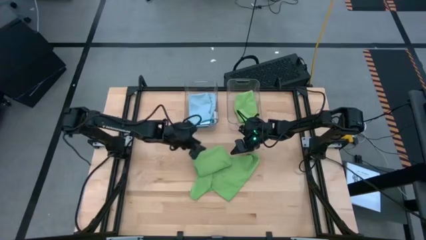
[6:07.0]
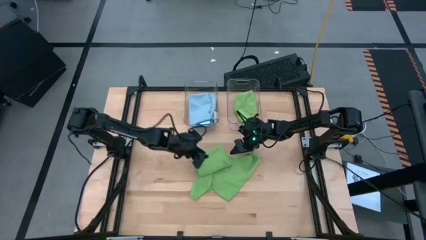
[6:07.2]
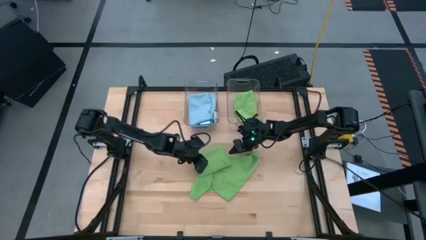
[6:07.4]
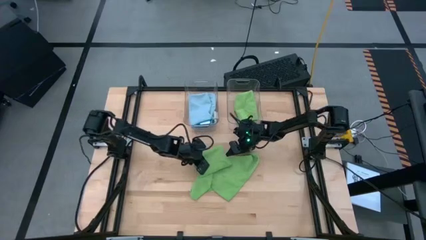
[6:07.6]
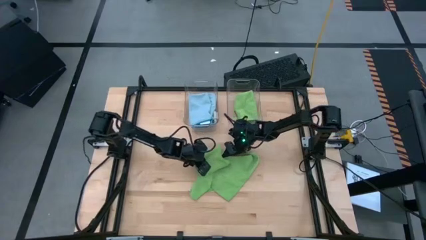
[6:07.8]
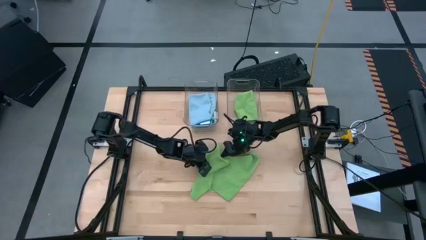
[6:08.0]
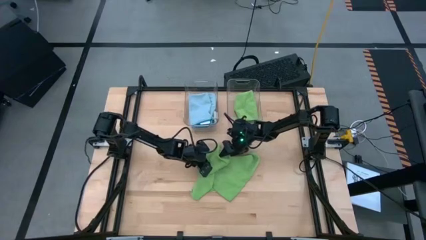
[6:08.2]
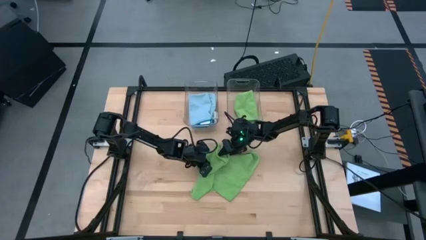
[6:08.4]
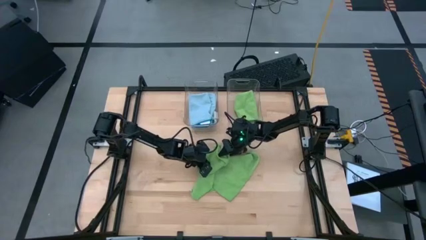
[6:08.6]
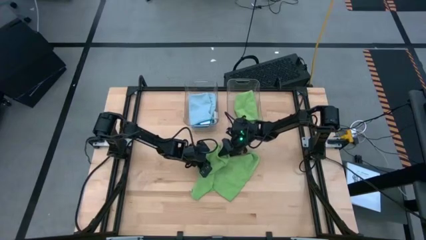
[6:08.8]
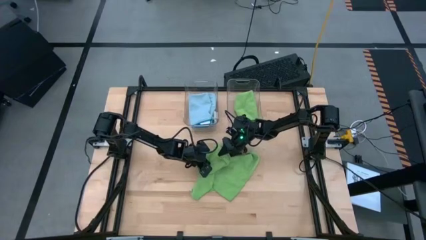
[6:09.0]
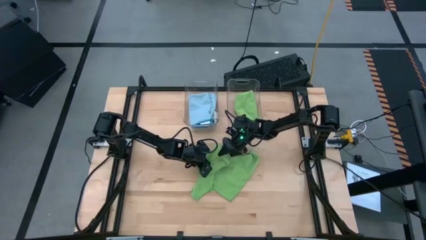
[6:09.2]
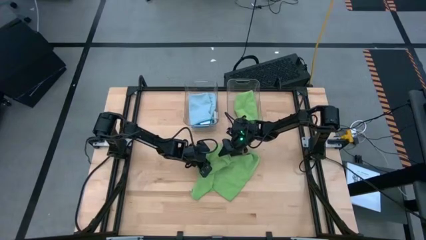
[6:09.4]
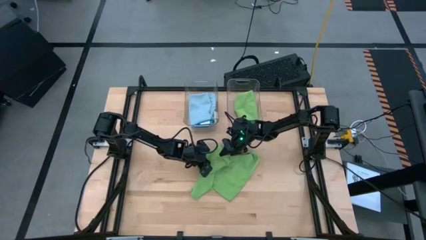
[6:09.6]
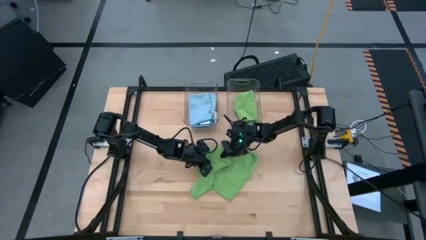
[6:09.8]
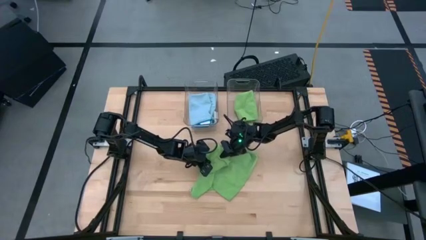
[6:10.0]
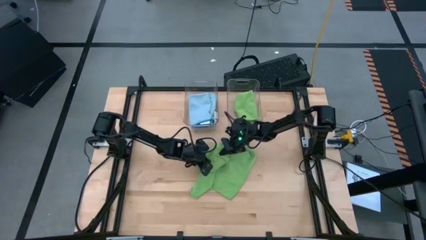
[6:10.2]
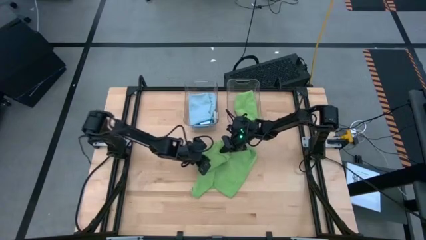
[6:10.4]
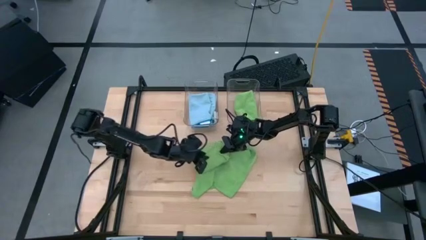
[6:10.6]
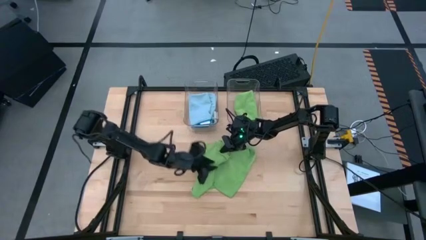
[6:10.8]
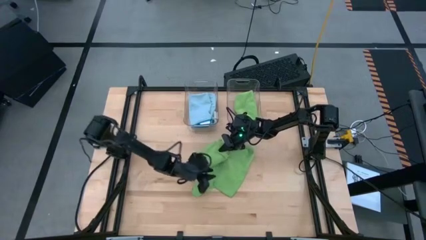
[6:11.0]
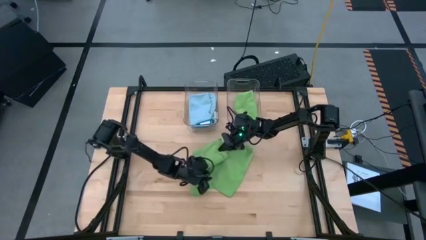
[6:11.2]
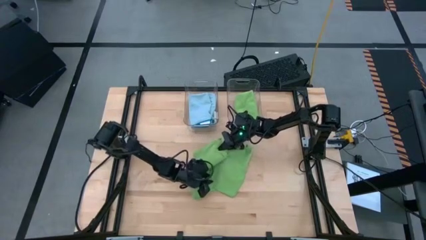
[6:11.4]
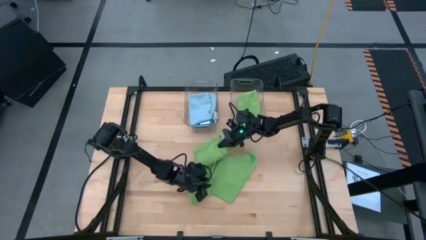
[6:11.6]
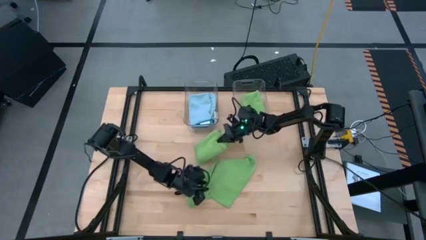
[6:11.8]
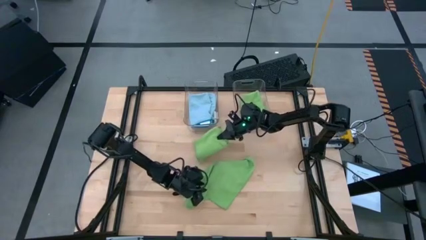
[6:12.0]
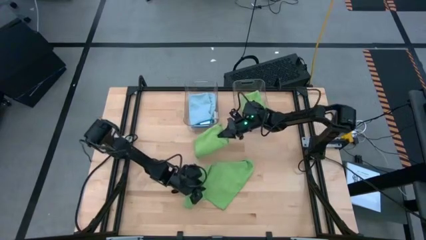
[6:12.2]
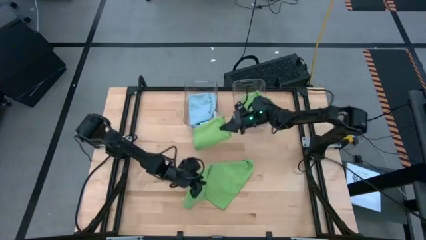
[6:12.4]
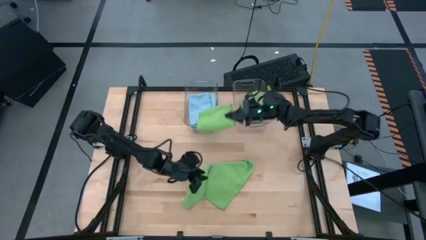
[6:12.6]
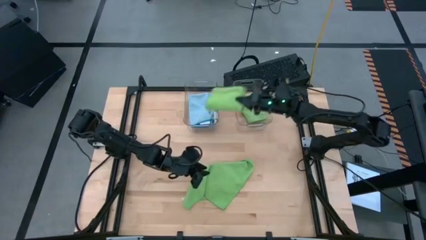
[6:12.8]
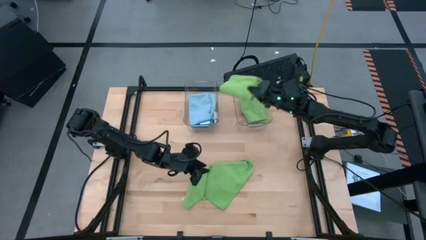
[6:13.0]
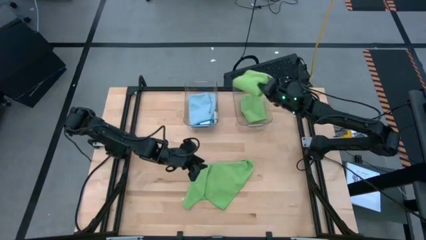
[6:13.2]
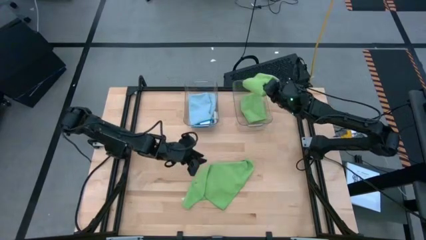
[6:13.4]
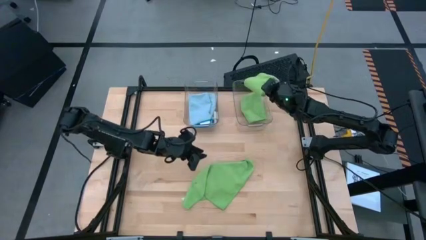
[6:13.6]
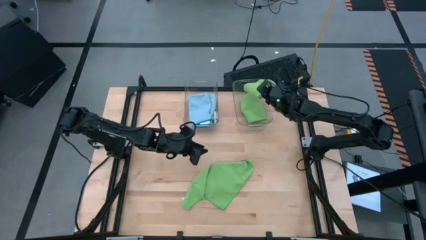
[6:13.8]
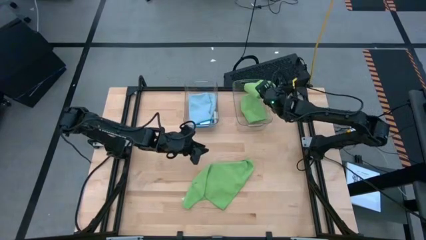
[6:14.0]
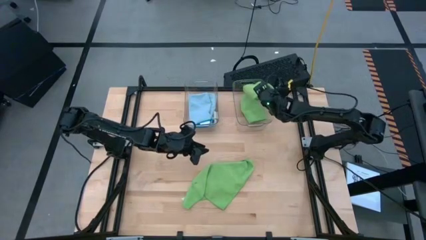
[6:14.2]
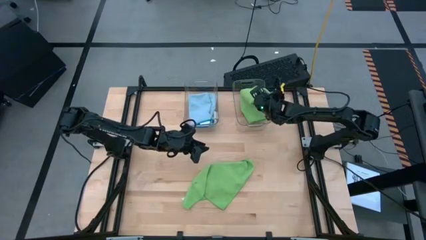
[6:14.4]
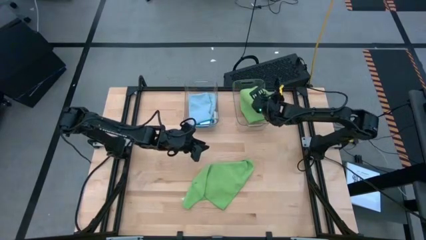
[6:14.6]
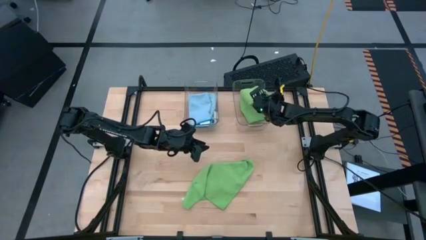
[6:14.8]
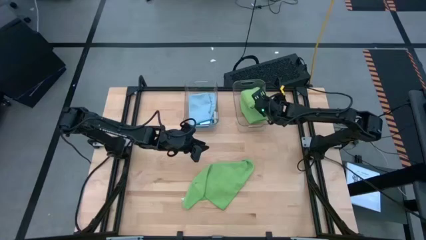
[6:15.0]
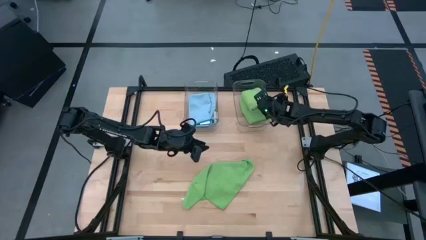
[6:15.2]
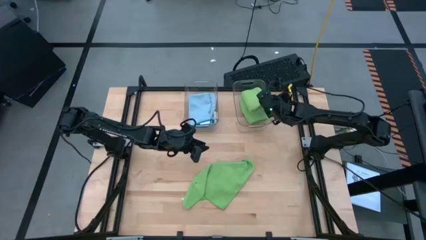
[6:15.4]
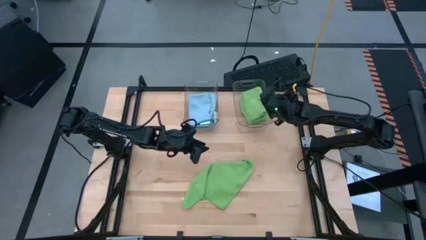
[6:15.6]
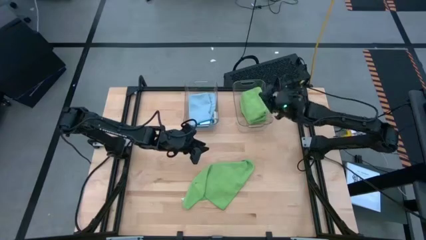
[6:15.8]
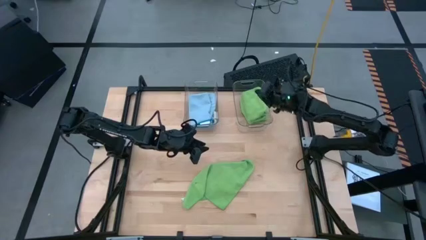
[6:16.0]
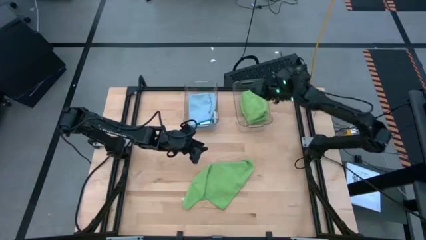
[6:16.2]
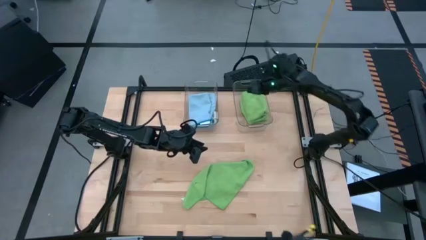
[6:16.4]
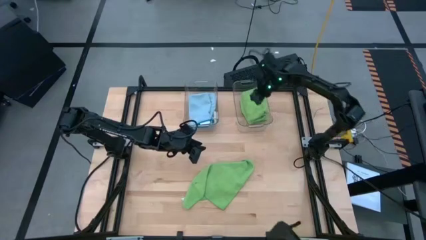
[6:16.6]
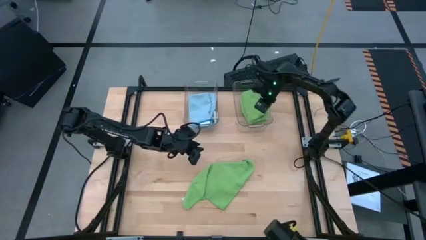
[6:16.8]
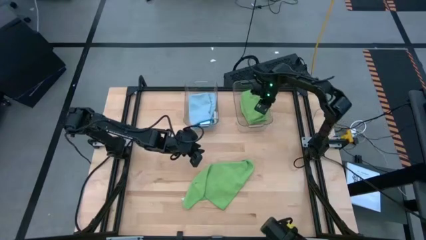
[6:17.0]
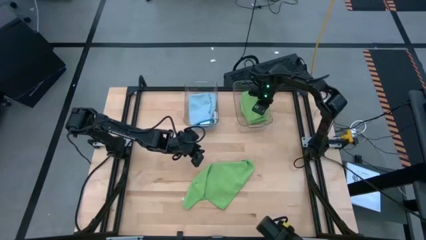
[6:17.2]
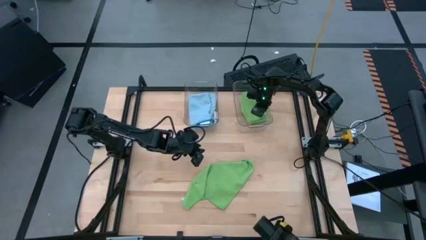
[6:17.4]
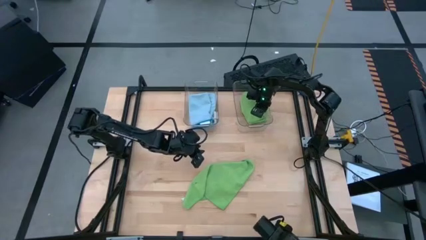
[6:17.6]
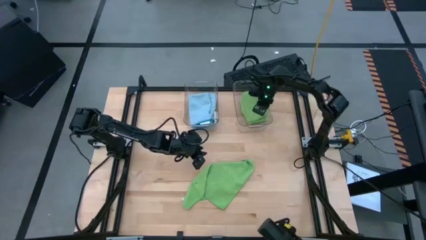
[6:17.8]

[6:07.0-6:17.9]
Task: Fold microfiber towels
Stack the folded green microfiber towel on top of the other green microfiber towel in the right transparent bin
